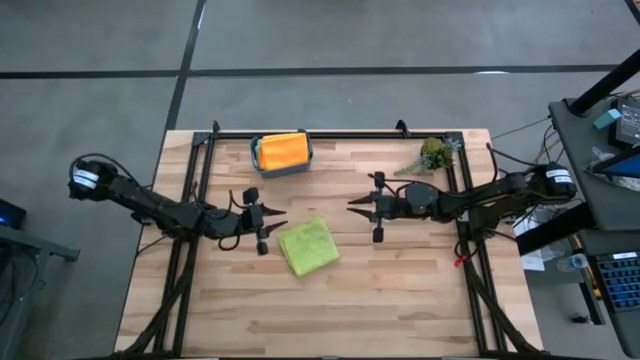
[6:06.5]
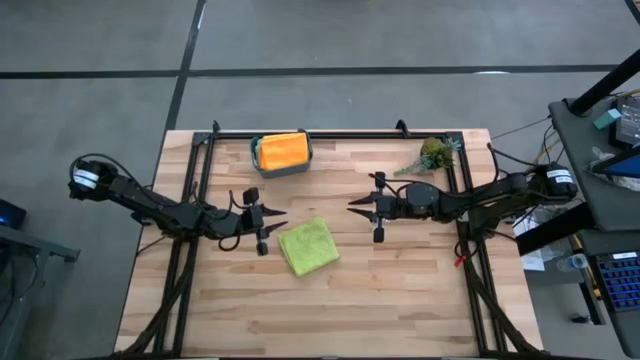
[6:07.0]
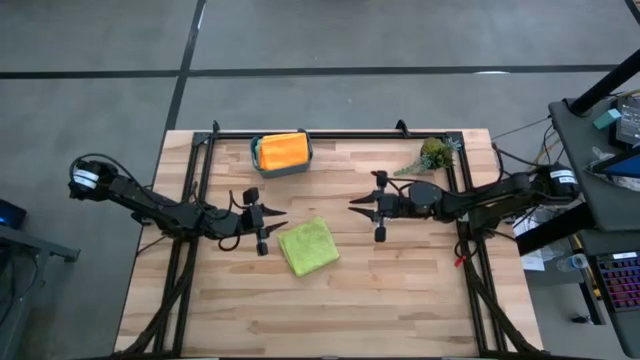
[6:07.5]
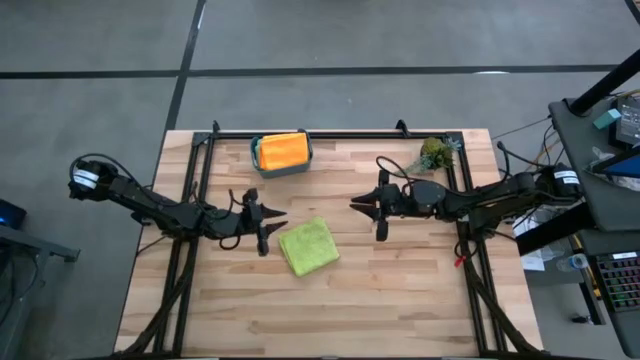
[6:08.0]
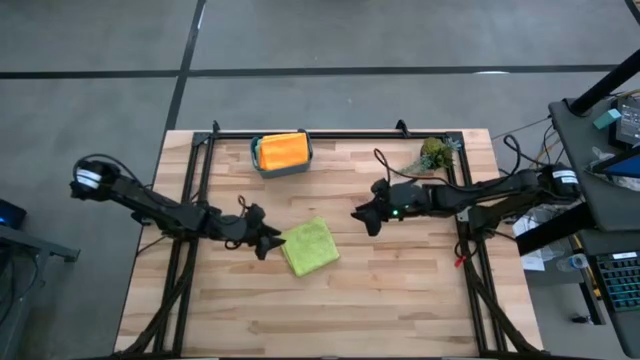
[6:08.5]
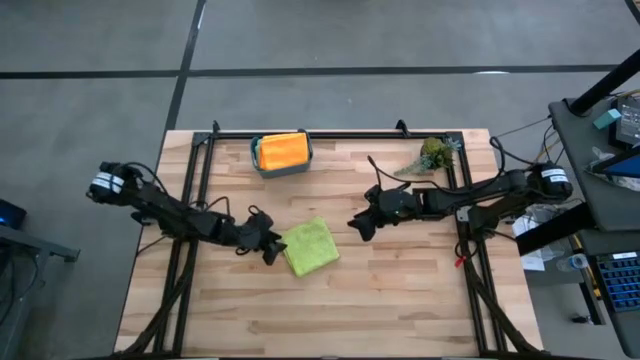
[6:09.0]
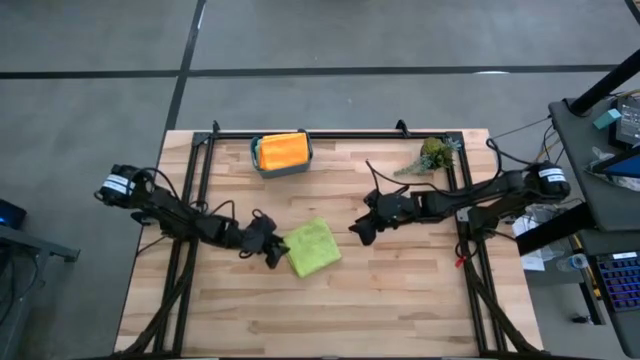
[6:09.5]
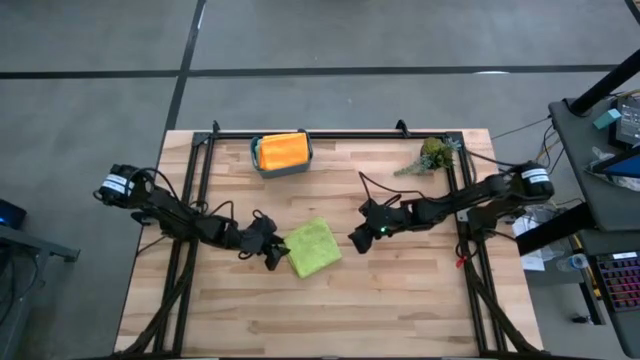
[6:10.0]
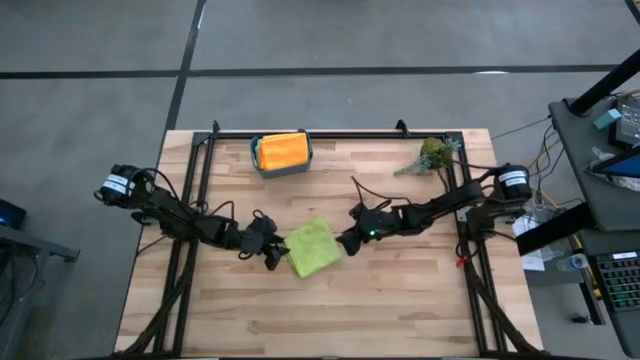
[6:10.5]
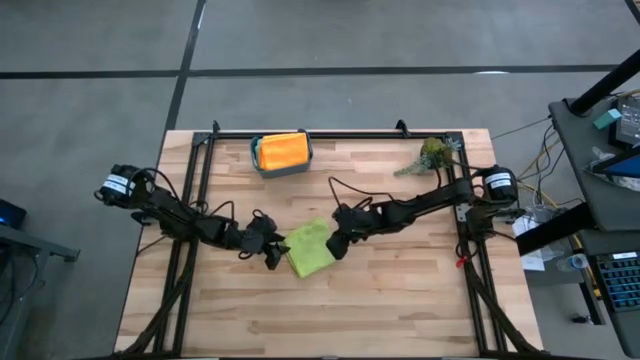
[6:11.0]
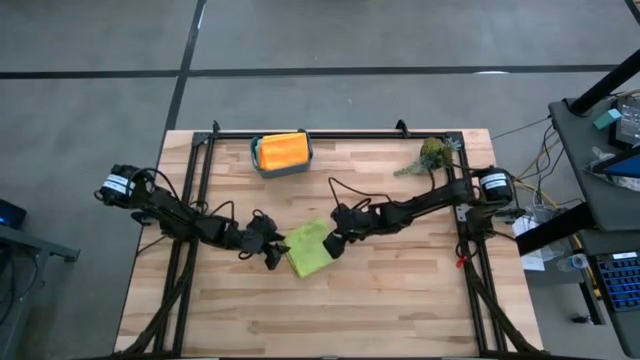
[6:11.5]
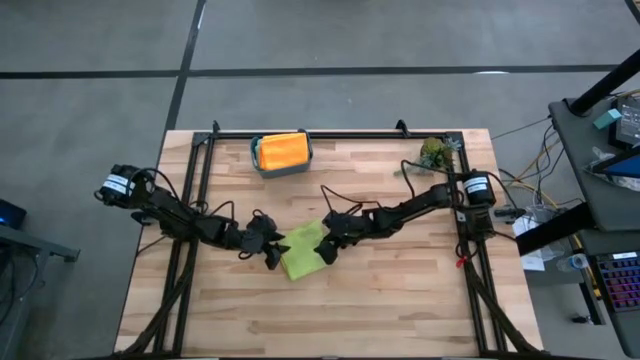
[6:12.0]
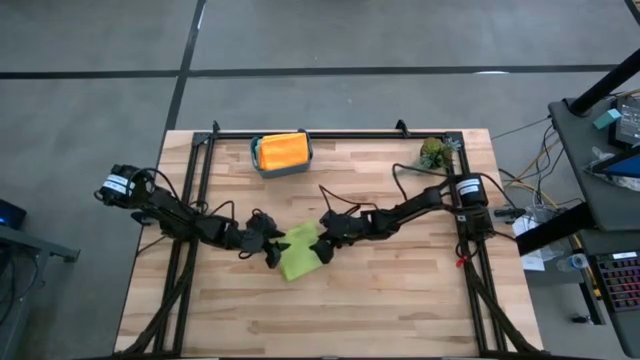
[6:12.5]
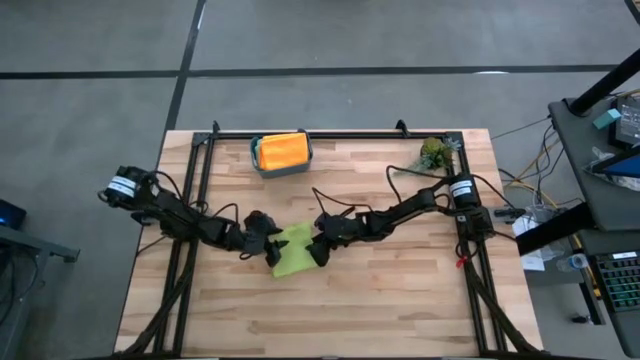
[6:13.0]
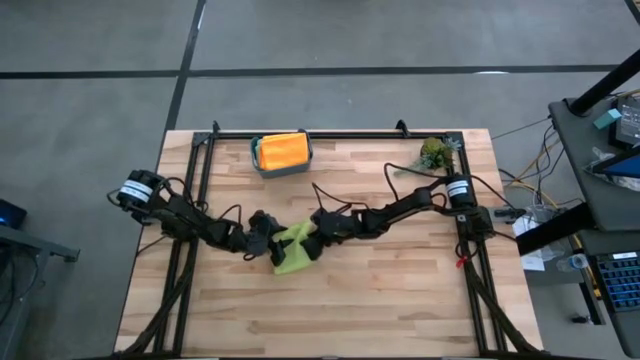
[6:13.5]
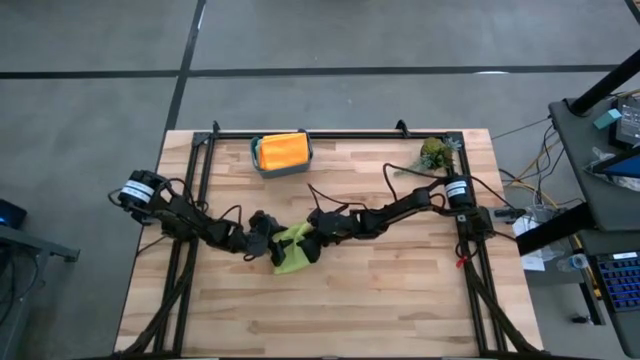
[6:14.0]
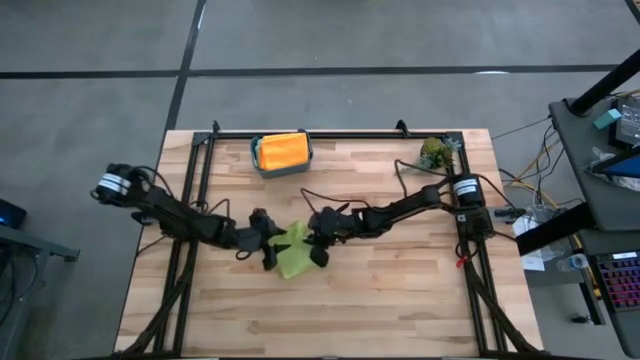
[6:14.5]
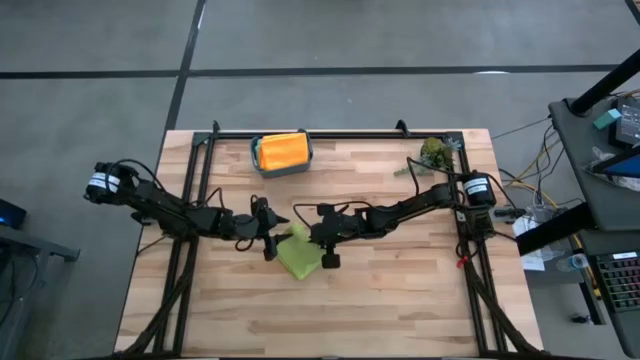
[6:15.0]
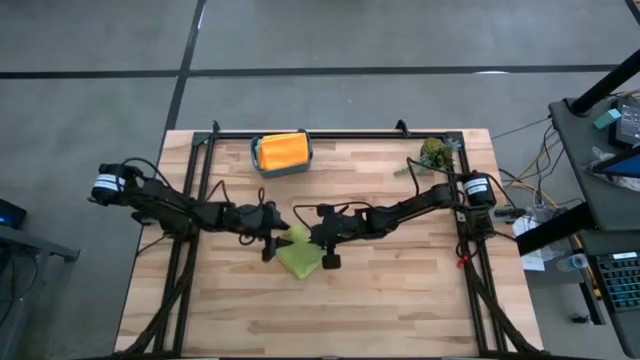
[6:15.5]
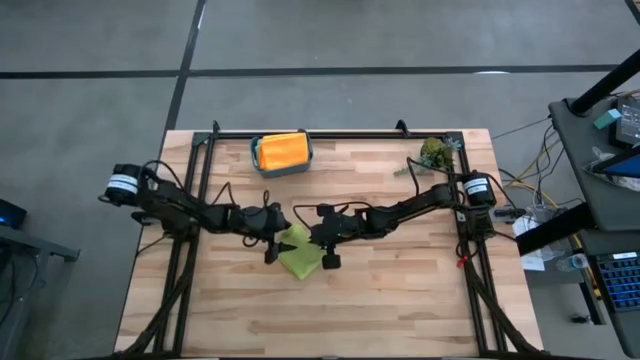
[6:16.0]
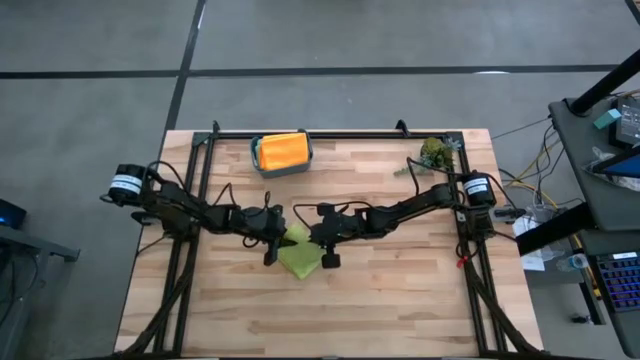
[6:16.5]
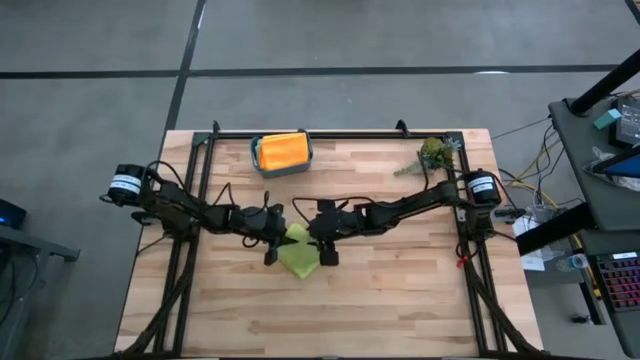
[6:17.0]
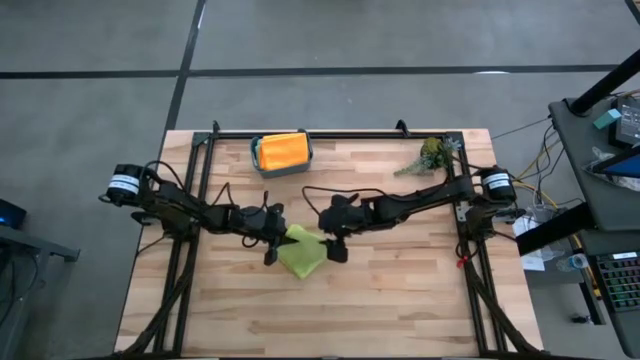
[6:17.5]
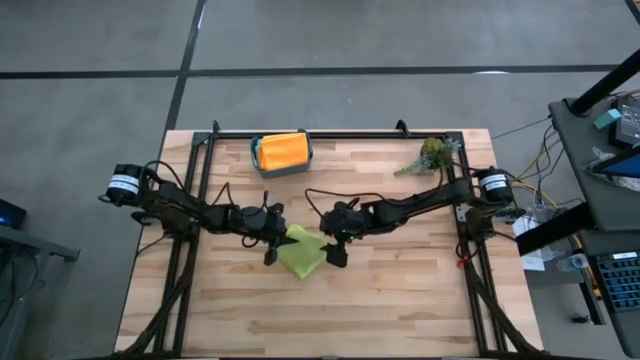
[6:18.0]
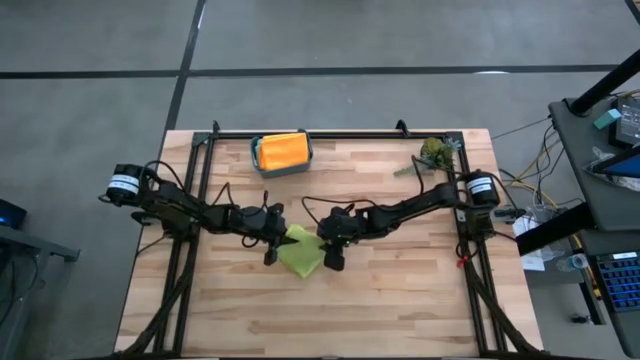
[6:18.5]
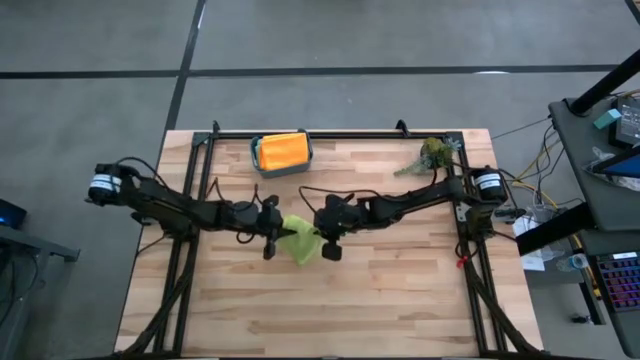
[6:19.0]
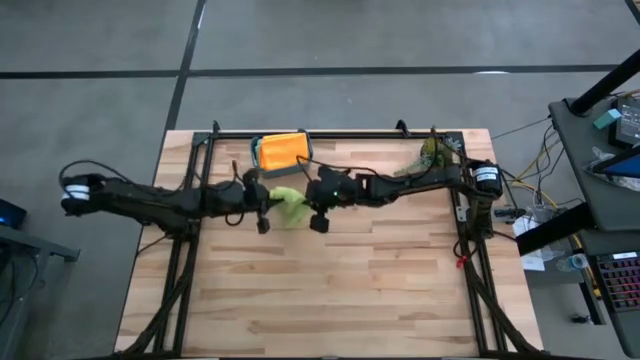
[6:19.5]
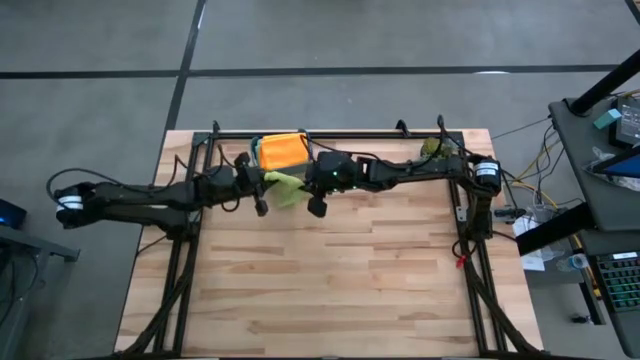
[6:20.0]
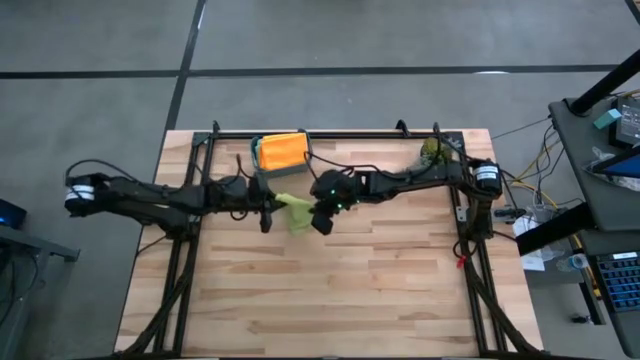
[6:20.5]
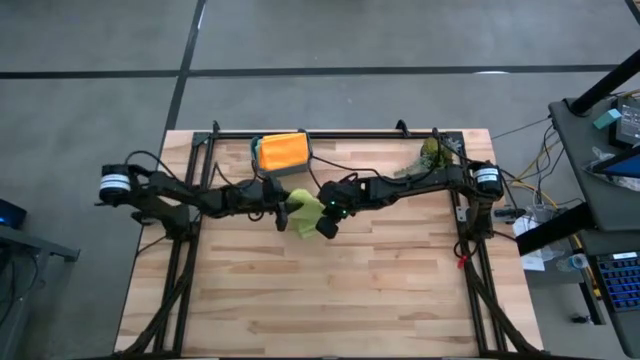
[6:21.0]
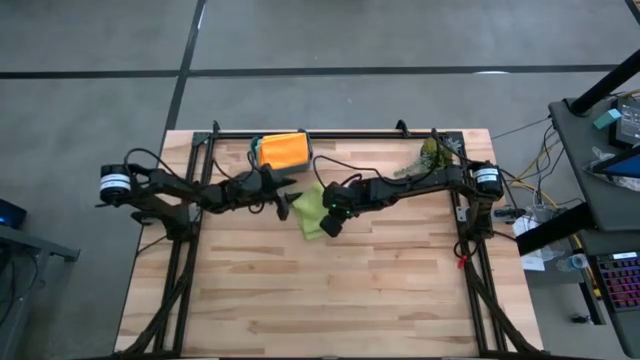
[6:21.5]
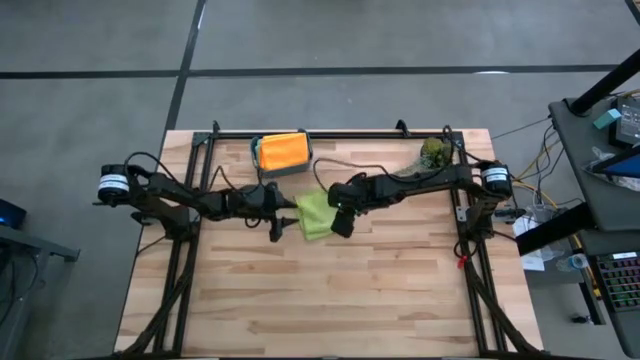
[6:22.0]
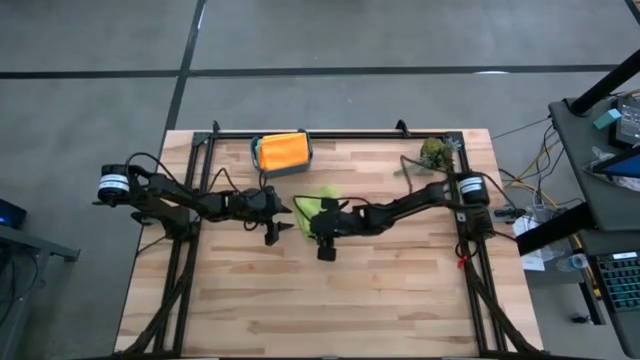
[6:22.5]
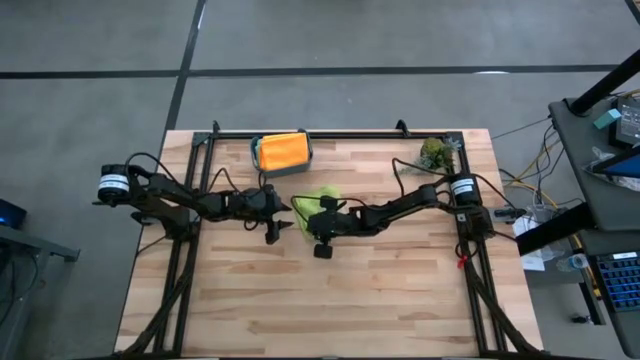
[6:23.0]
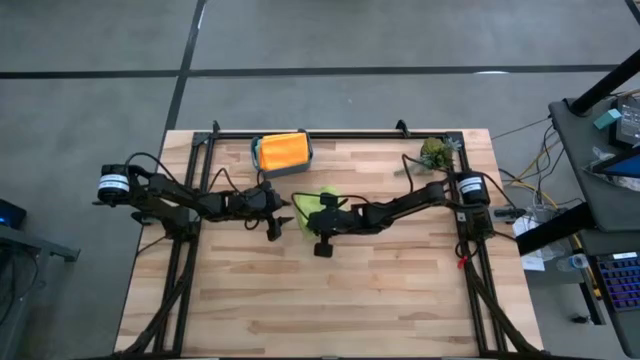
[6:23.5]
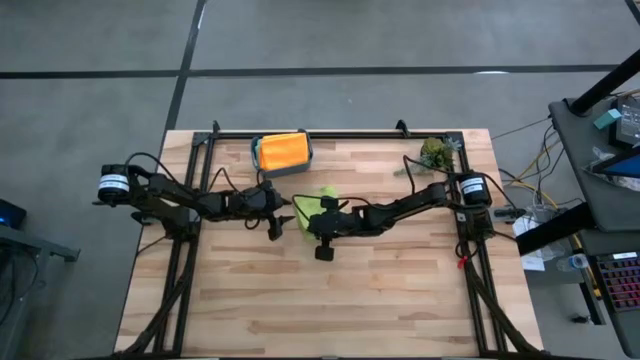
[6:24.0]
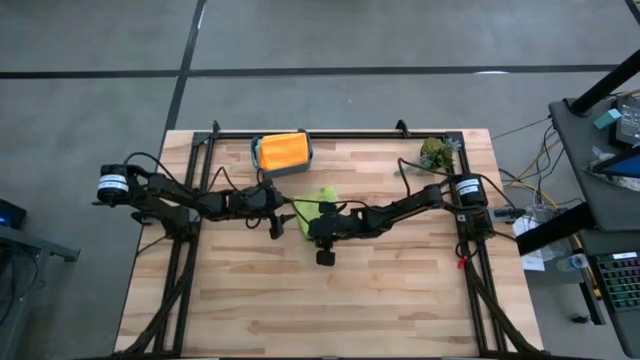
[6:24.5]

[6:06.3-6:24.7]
Task: Fold microfiber towels
Fold the light green microfiber towel

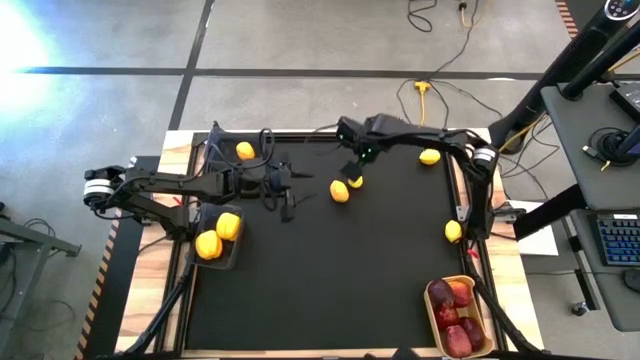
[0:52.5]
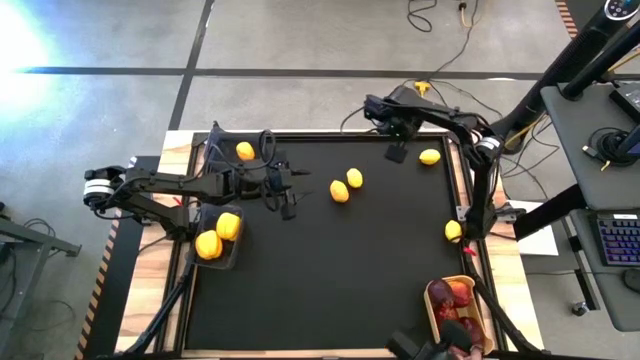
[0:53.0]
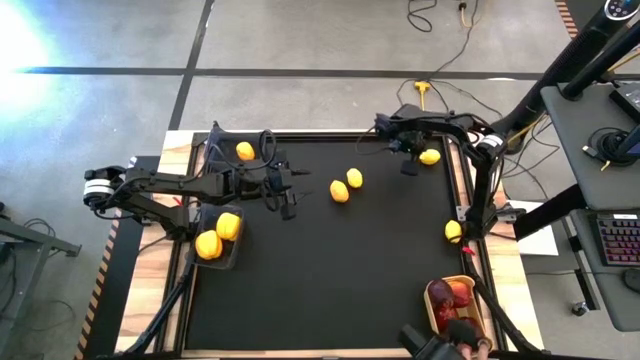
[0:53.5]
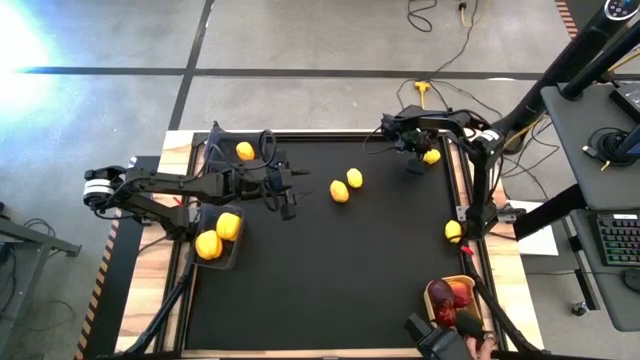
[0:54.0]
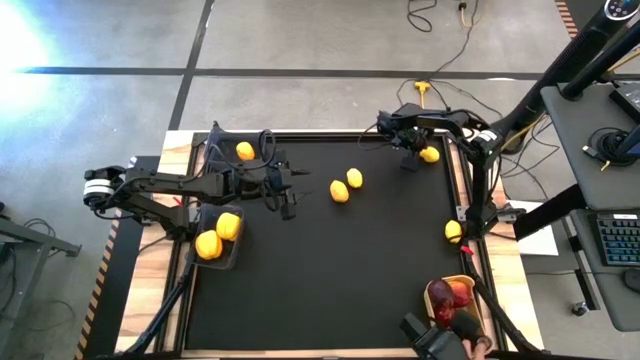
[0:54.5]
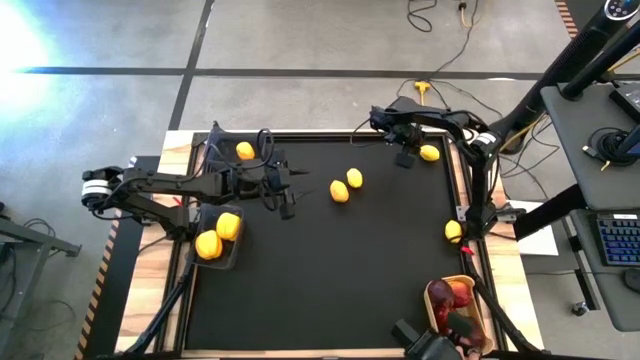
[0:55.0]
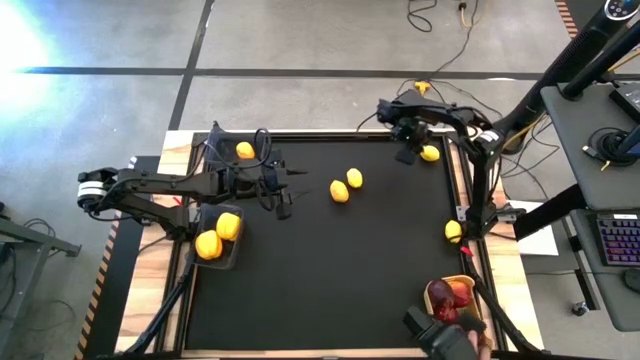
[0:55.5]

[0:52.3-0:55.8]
Task: Sort produce into baskets
Move the lemon to the center of the table
